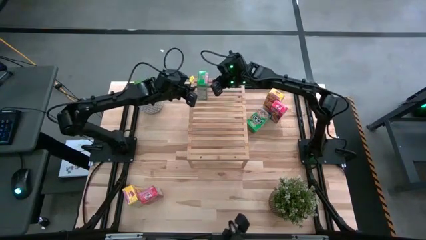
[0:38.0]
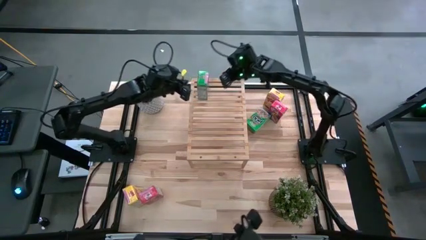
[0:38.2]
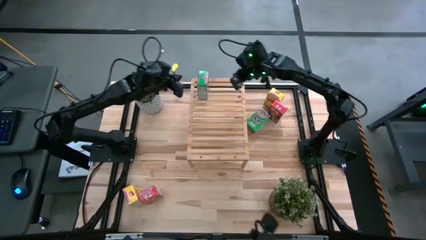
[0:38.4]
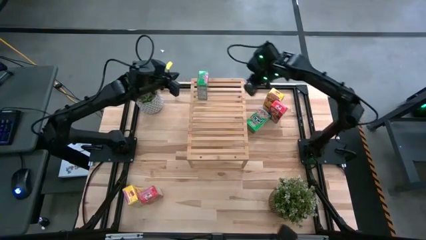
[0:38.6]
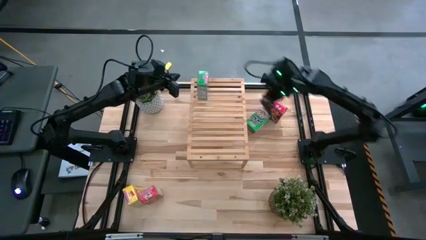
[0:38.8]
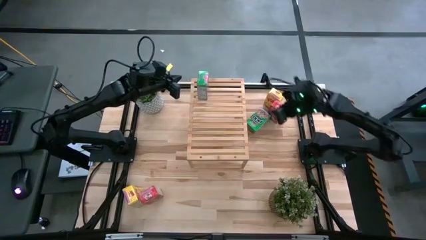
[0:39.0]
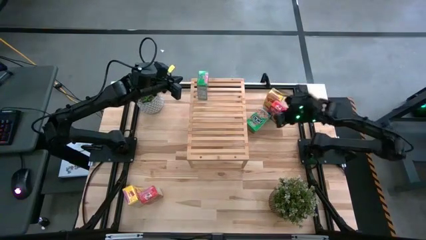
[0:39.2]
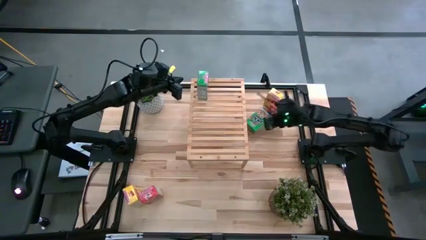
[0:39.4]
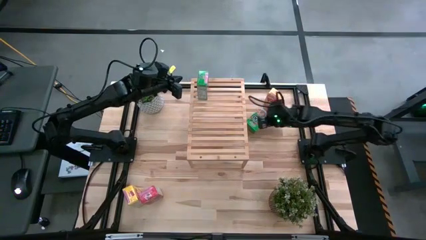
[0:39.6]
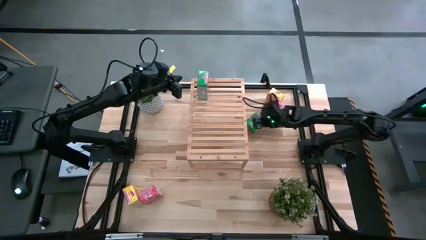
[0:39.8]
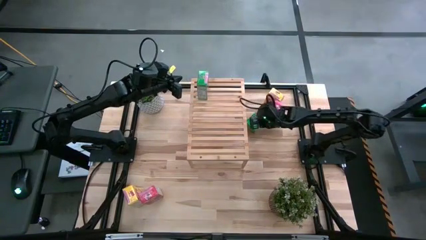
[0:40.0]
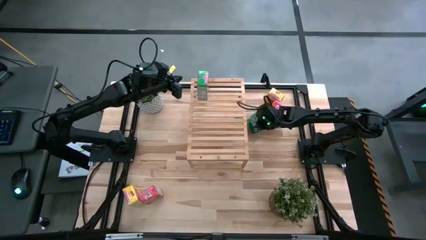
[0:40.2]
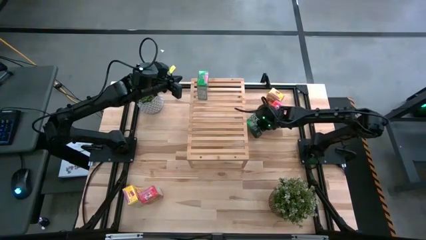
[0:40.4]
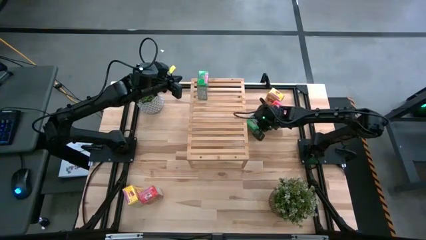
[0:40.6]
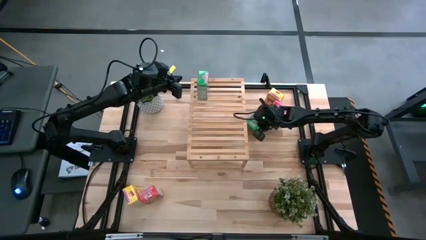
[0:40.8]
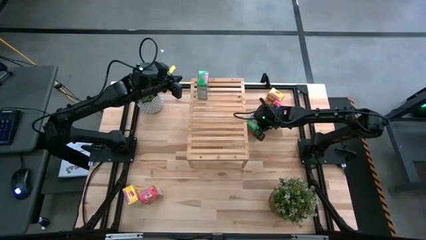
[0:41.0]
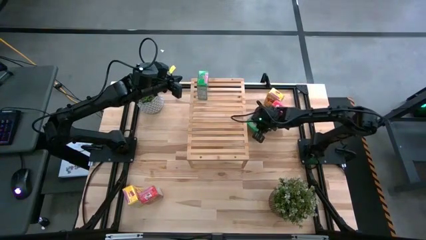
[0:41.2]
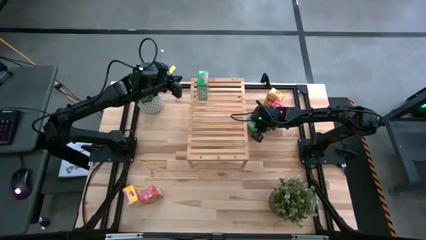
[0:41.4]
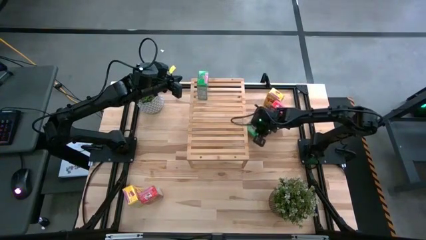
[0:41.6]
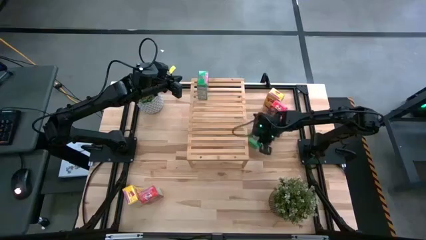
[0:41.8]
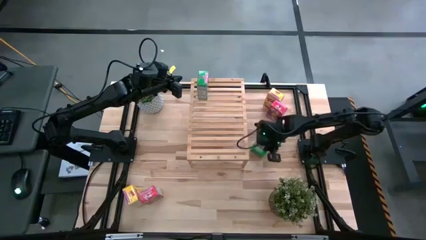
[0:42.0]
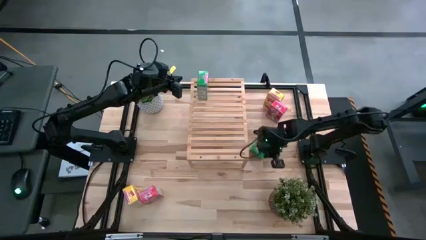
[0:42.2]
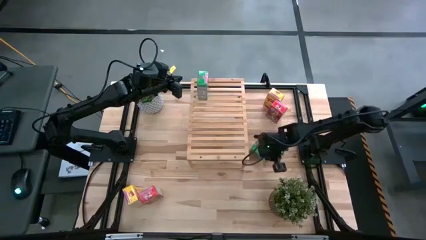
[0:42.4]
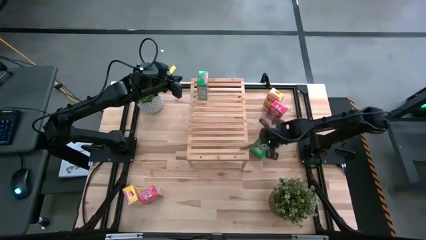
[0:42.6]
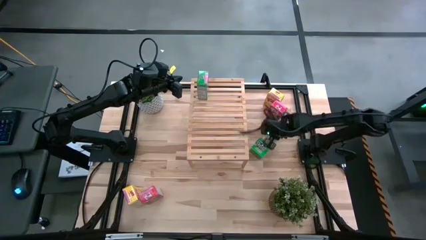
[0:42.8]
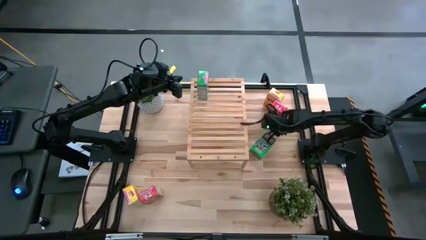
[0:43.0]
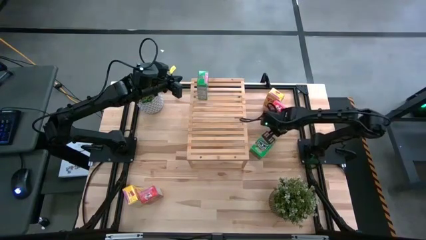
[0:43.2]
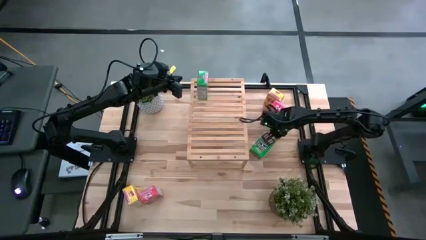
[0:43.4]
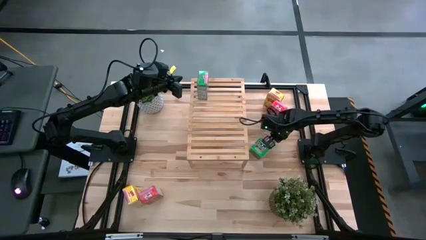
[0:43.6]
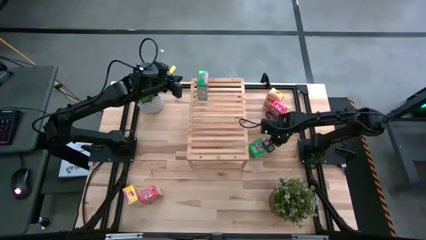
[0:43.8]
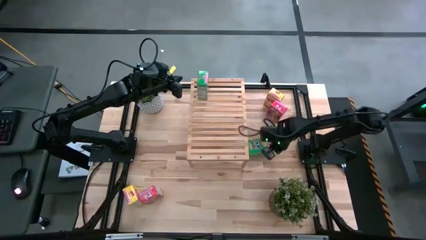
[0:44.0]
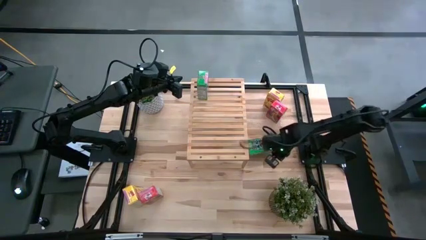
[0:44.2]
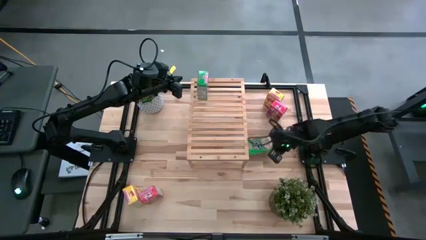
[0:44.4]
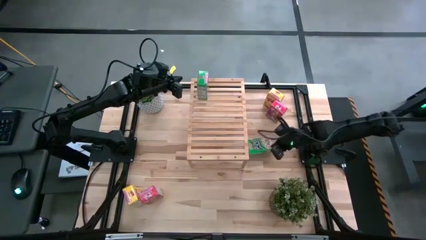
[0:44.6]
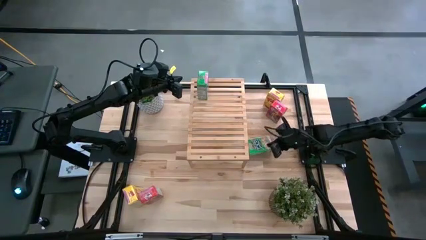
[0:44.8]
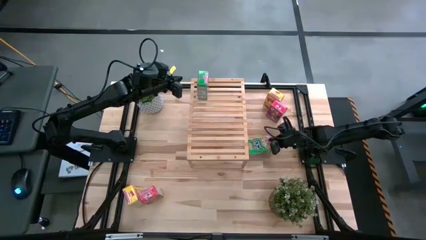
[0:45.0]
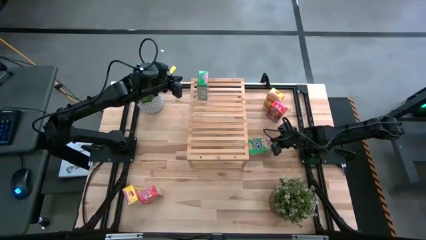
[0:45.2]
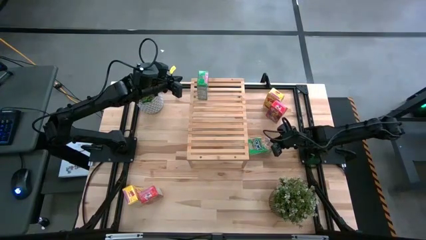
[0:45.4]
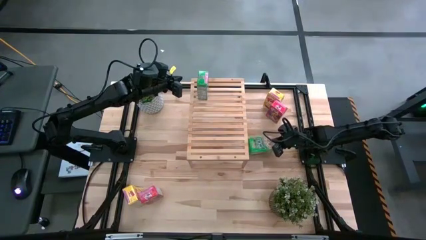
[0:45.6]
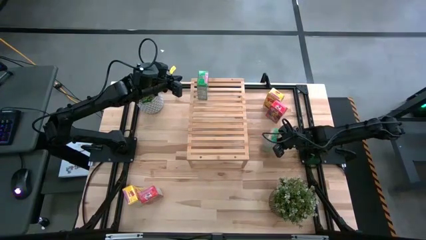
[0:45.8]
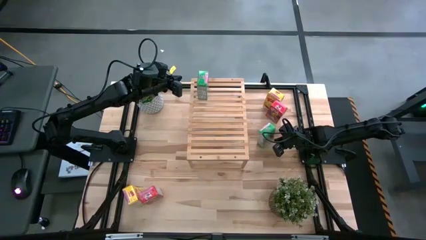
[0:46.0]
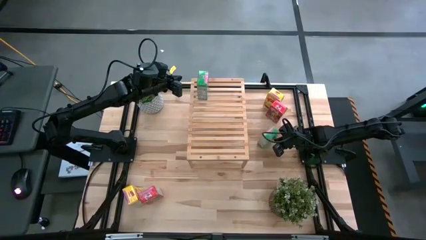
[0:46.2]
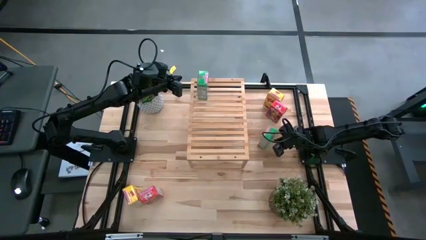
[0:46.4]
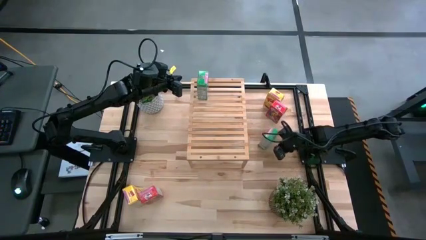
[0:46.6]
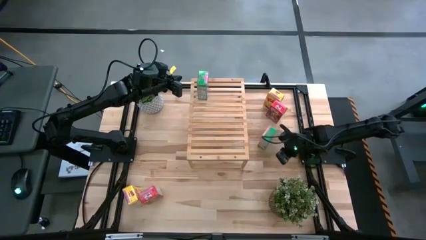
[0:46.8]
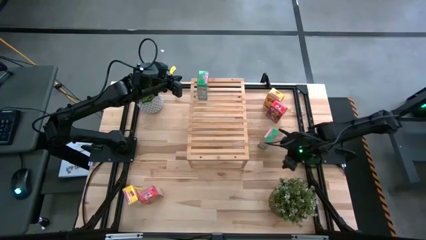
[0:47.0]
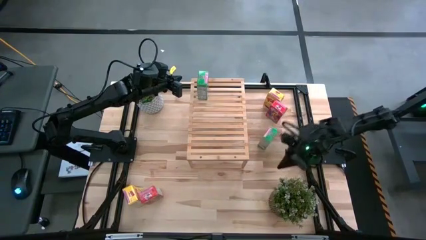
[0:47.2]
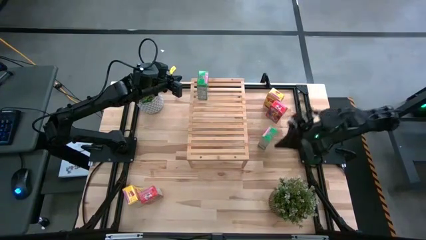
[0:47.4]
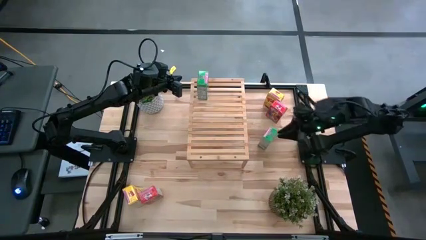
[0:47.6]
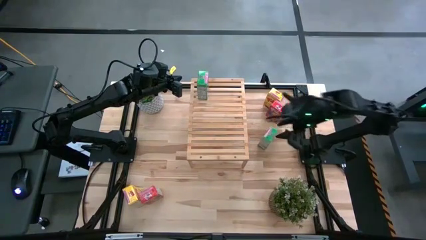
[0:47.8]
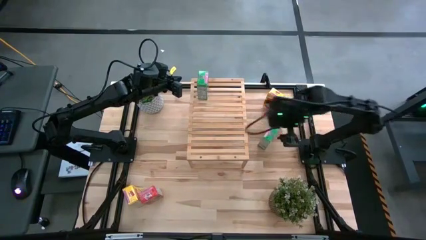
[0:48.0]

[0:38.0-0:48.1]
Task: Stack cereal on shelf
Put the right green cereal box on the shelf and align with the other green cereal box
